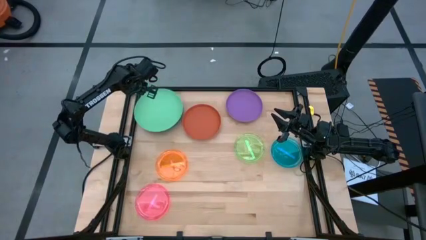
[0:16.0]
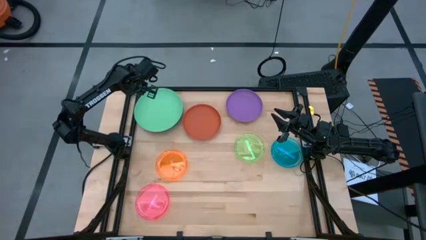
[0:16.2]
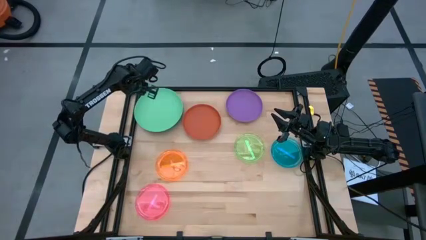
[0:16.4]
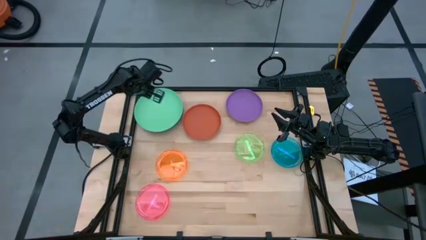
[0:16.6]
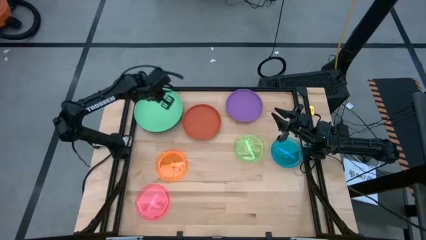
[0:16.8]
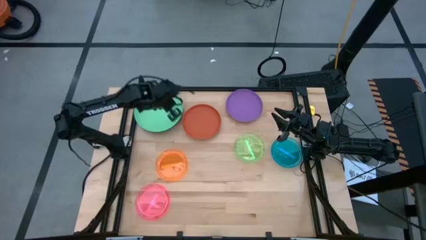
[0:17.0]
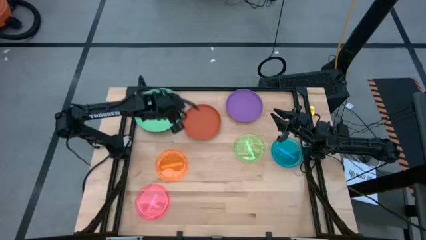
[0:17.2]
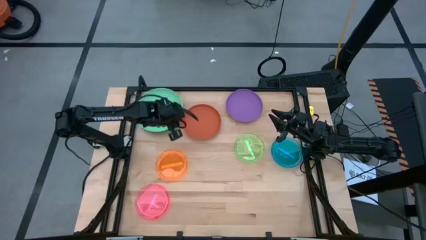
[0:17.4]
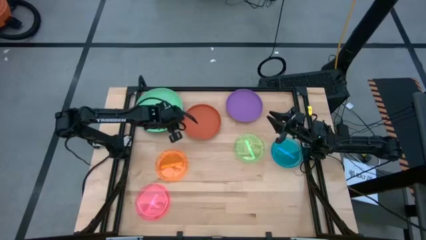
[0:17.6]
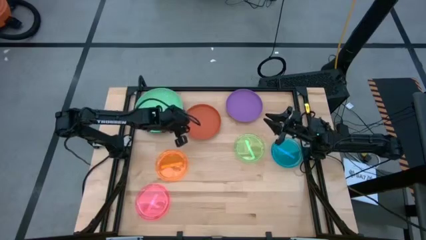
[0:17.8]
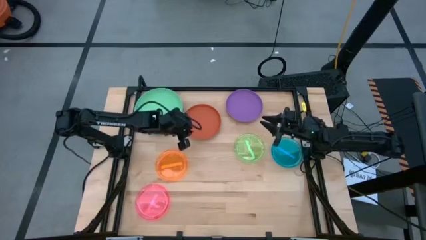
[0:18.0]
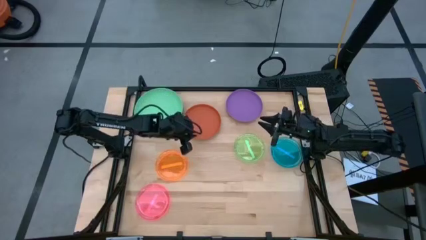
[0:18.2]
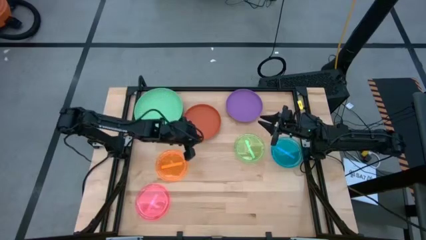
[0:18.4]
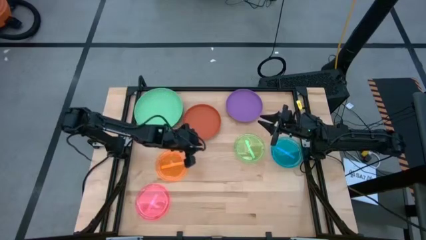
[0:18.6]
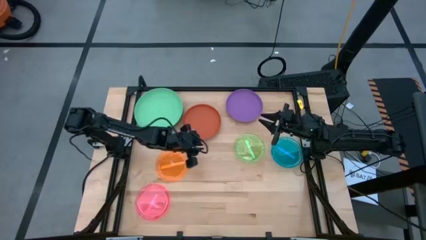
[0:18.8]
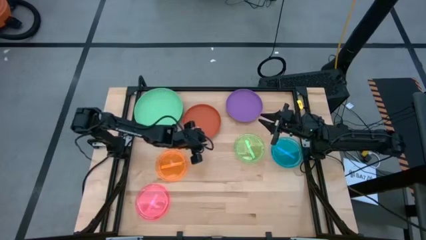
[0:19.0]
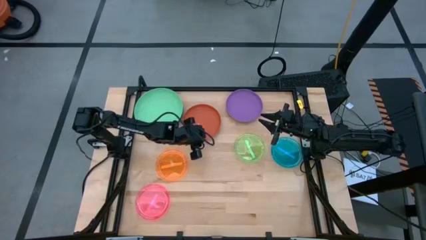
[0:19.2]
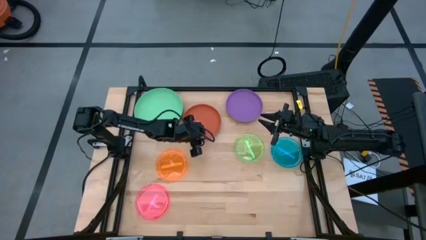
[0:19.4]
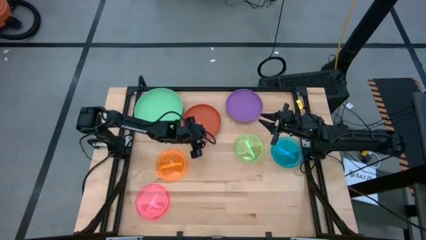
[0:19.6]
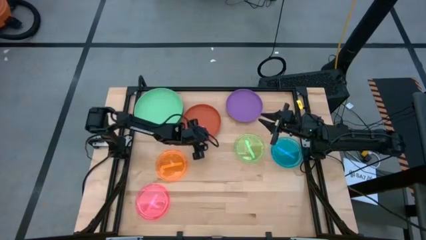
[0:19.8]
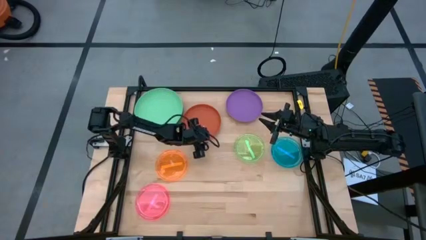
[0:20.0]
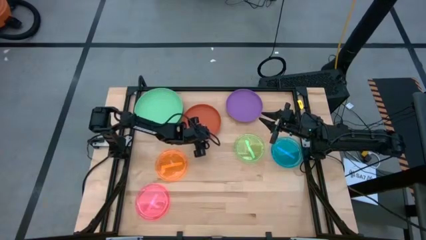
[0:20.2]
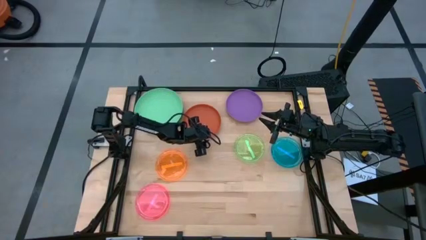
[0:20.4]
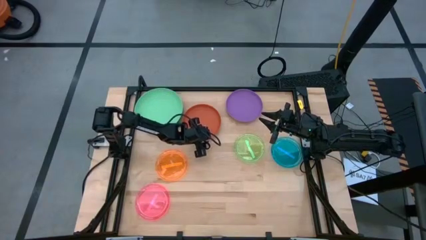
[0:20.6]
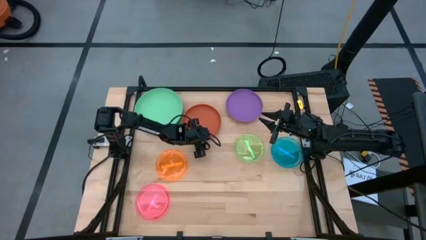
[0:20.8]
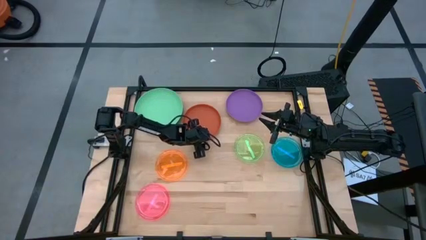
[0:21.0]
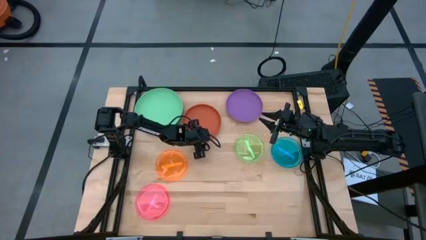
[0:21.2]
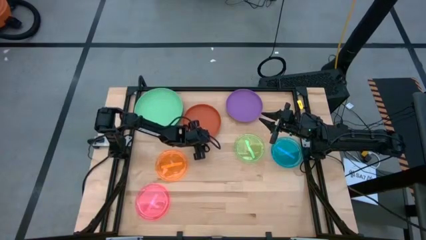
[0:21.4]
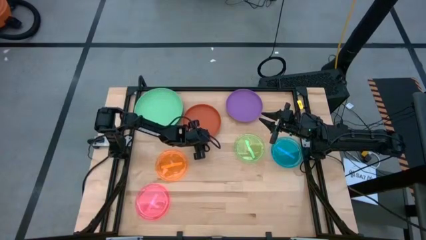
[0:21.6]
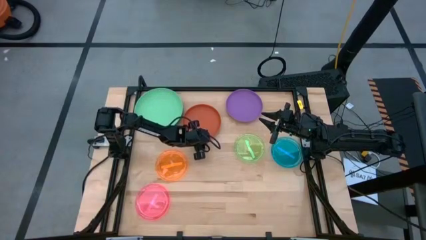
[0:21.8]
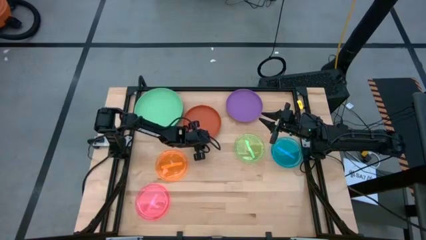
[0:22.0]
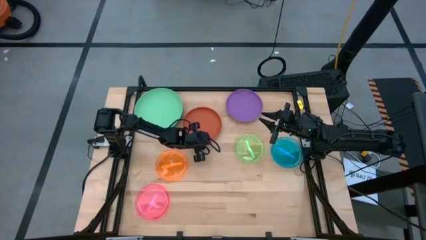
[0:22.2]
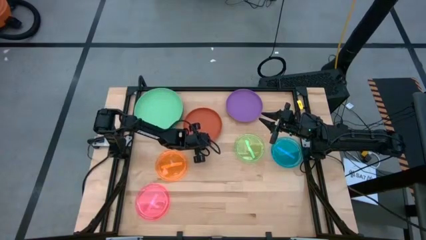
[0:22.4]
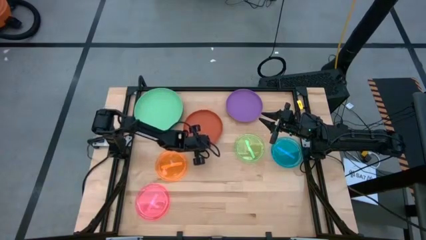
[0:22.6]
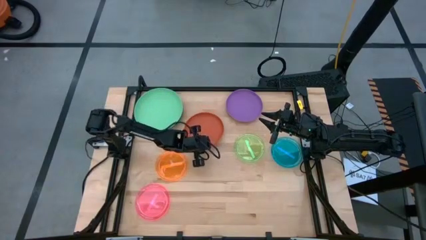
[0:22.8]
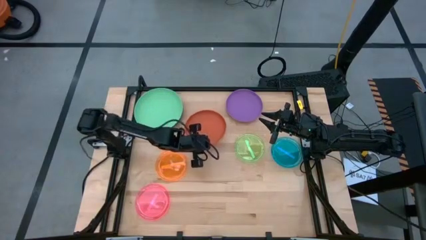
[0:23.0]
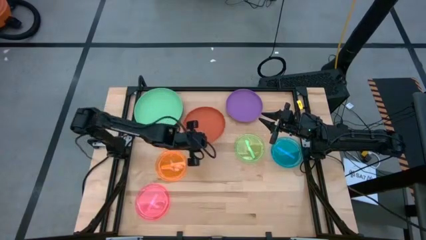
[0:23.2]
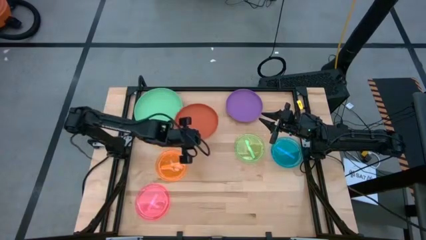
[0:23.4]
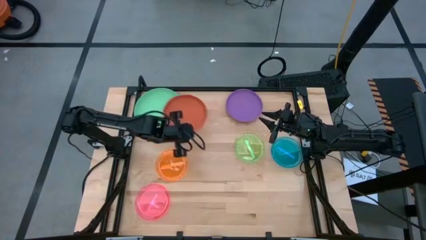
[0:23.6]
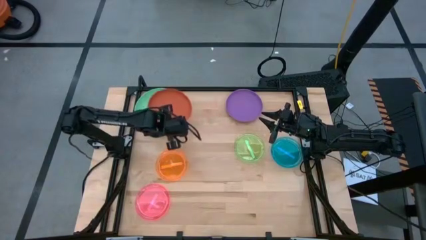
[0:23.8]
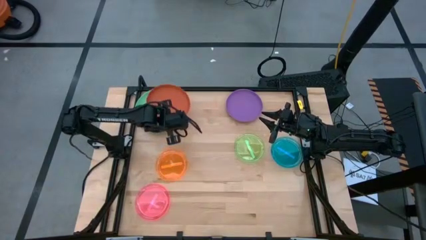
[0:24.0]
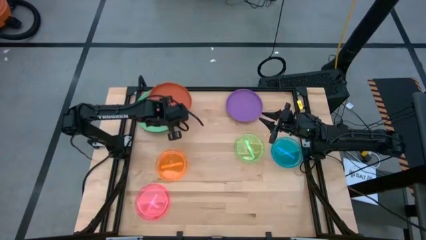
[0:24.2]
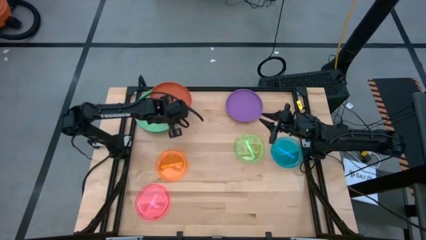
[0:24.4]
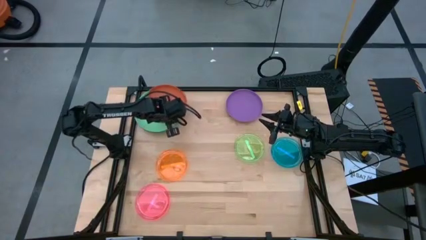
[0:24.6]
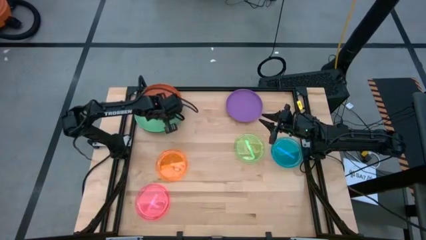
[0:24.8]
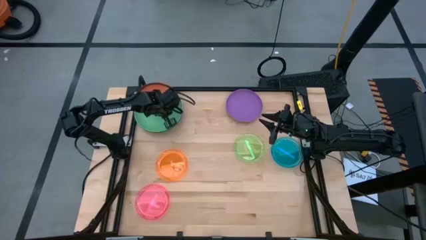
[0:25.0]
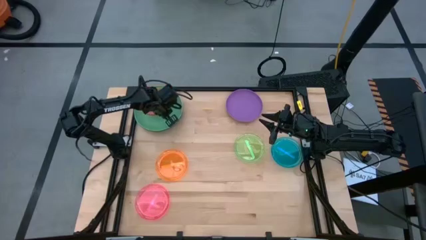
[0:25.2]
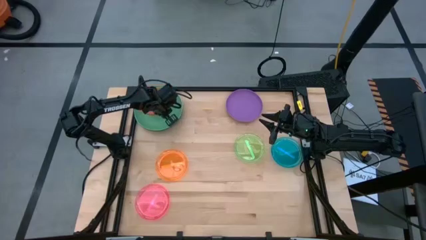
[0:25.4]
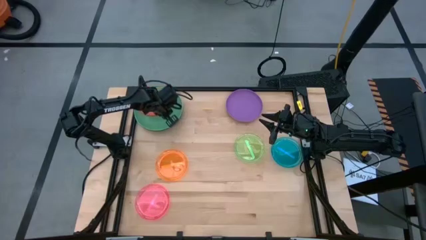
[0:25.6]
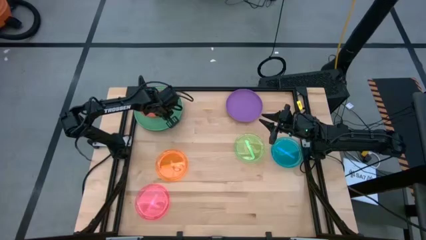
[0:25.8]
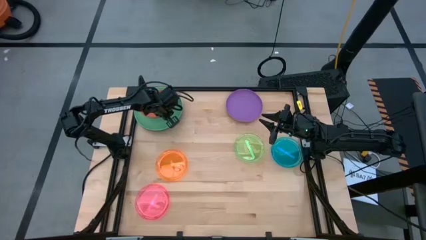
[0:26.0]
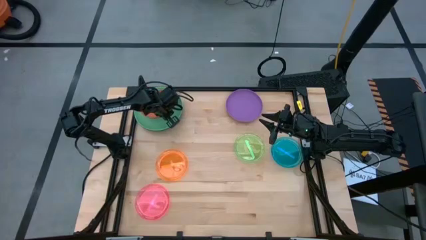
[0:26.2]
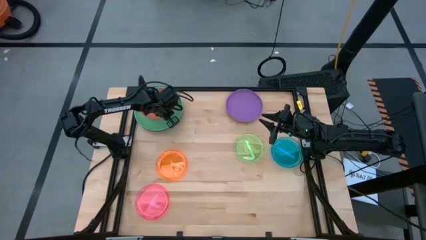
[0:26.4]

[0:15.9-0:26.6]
Task: Stack plastic plates
Stack the orange plate on top of the light green plate
